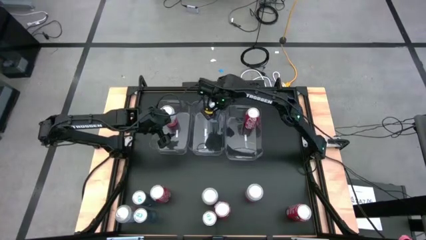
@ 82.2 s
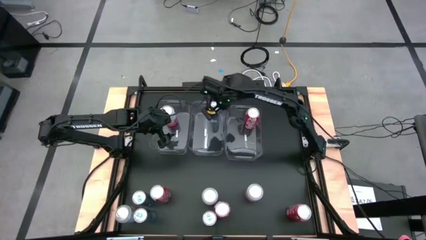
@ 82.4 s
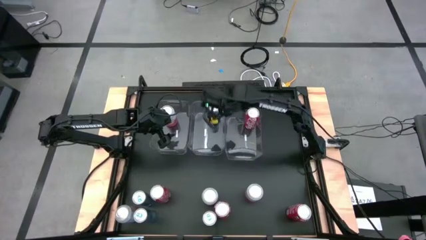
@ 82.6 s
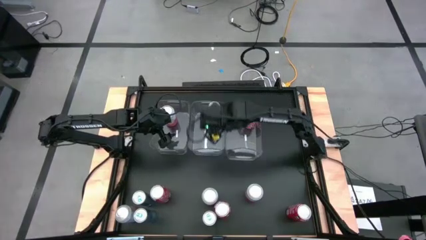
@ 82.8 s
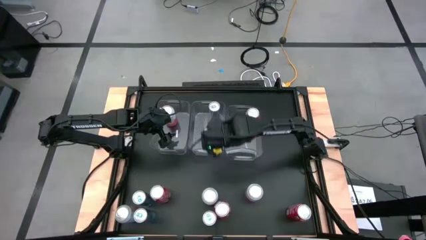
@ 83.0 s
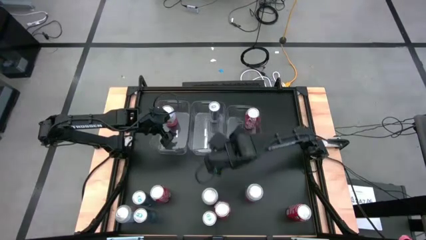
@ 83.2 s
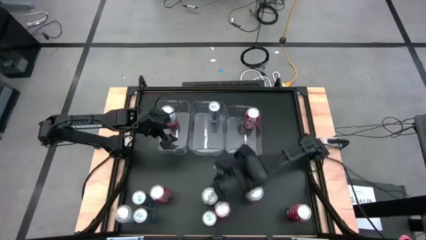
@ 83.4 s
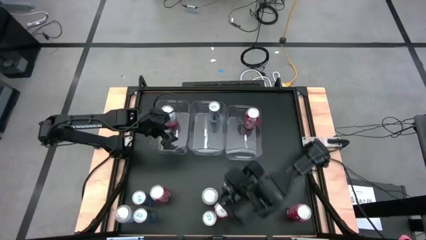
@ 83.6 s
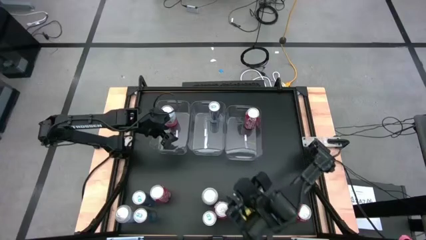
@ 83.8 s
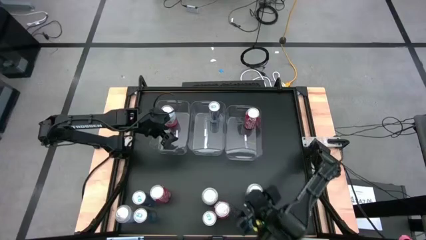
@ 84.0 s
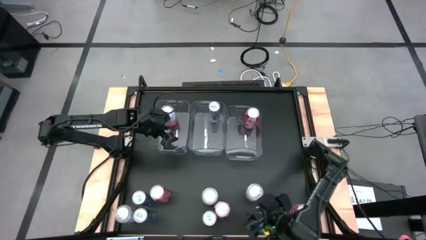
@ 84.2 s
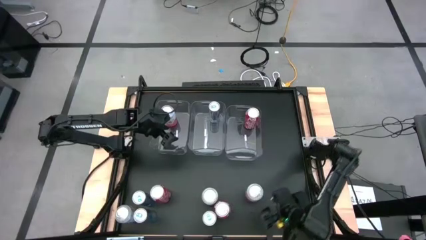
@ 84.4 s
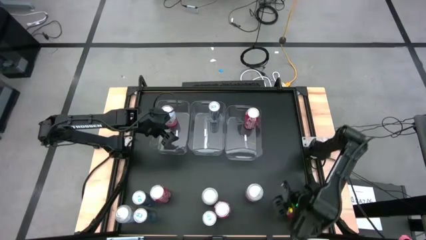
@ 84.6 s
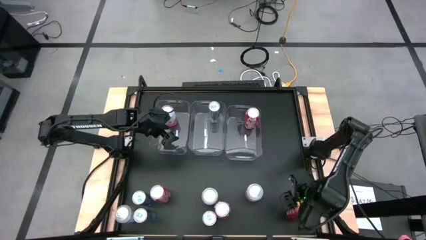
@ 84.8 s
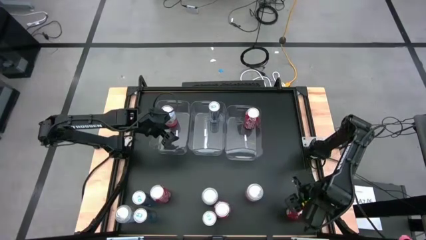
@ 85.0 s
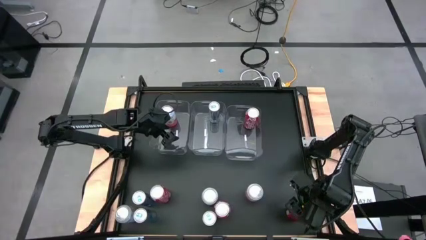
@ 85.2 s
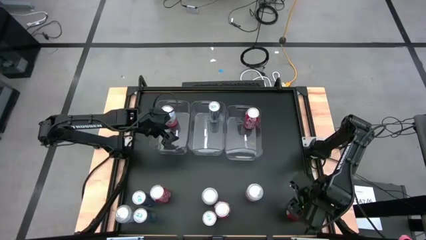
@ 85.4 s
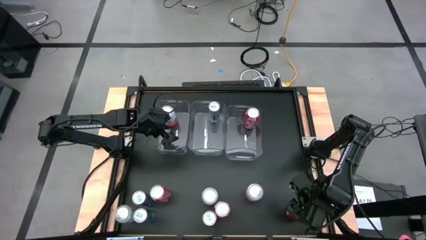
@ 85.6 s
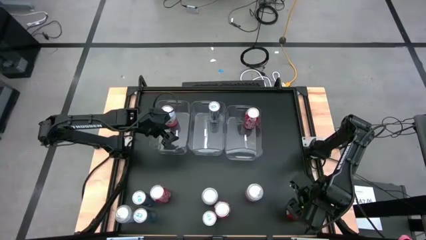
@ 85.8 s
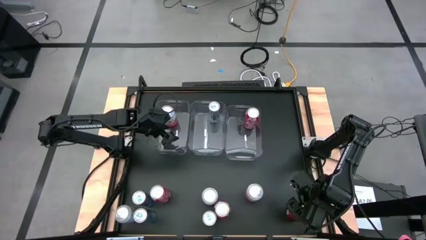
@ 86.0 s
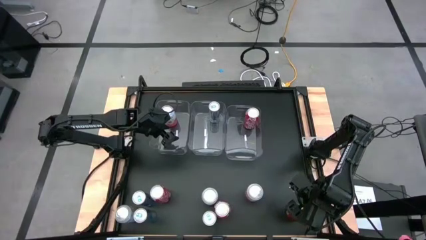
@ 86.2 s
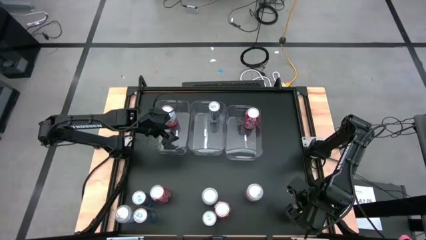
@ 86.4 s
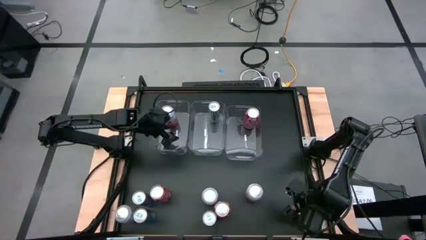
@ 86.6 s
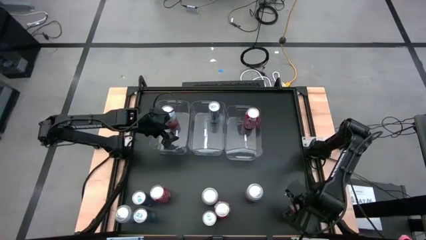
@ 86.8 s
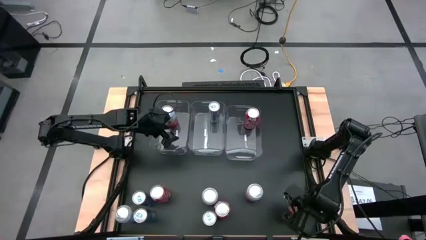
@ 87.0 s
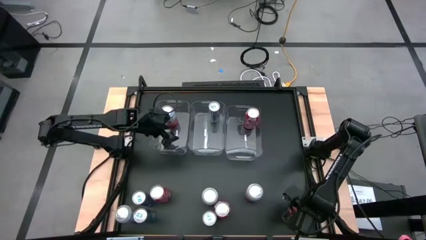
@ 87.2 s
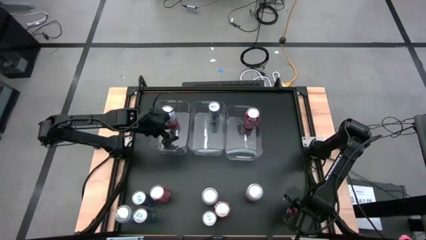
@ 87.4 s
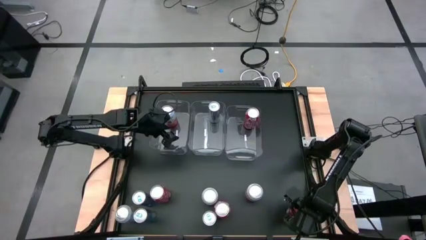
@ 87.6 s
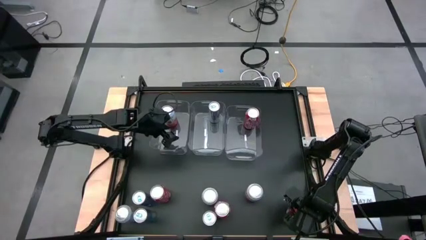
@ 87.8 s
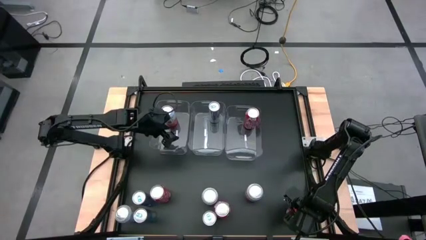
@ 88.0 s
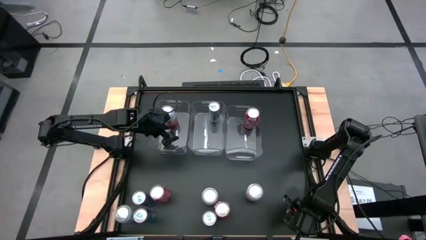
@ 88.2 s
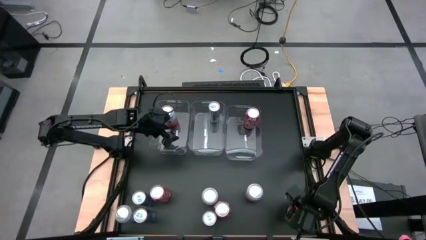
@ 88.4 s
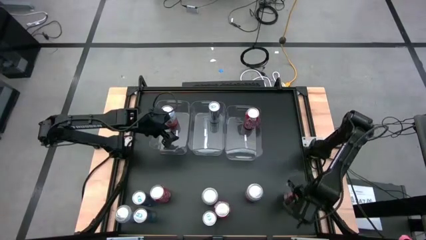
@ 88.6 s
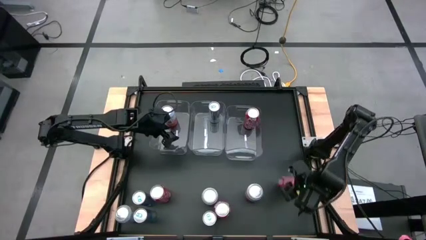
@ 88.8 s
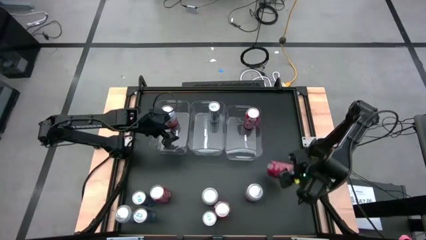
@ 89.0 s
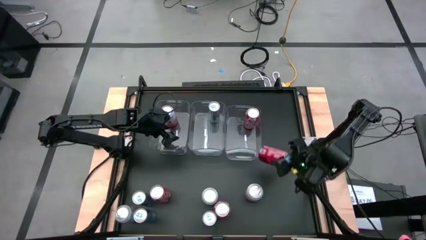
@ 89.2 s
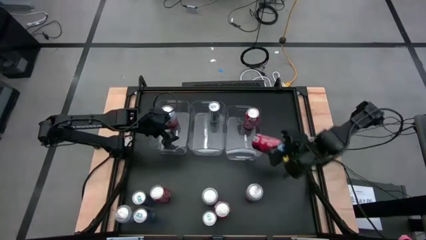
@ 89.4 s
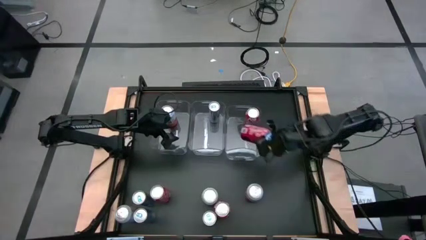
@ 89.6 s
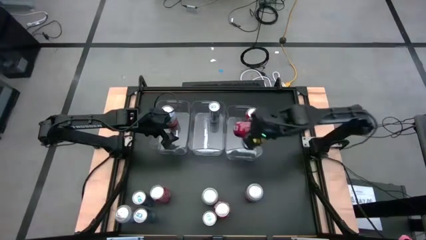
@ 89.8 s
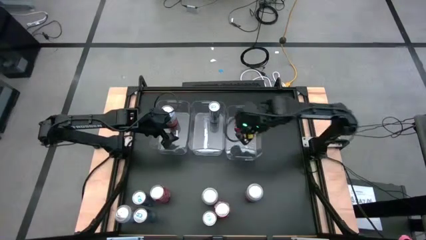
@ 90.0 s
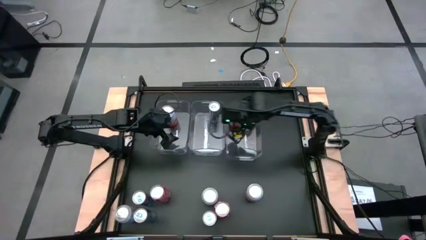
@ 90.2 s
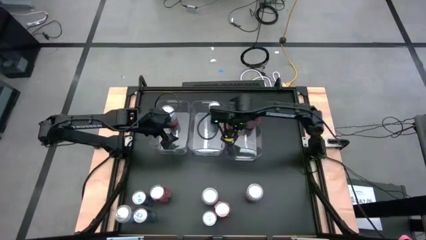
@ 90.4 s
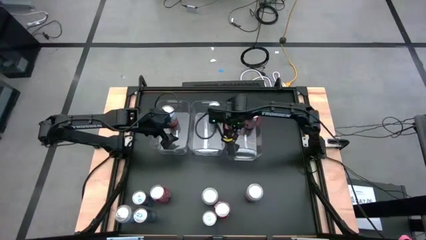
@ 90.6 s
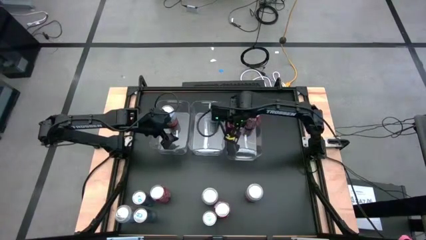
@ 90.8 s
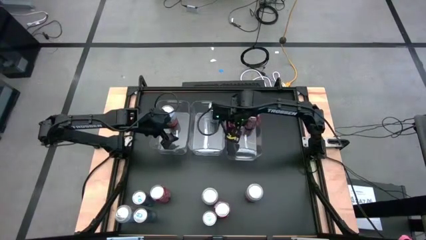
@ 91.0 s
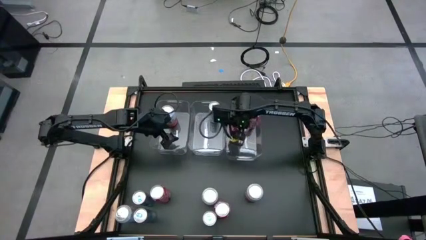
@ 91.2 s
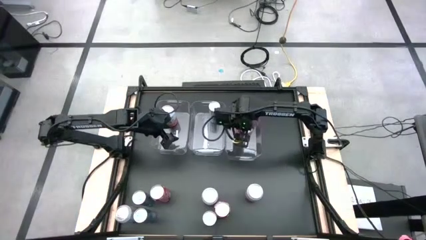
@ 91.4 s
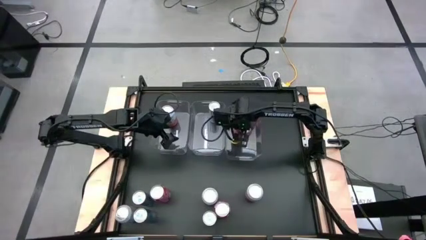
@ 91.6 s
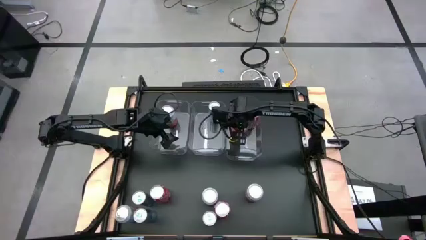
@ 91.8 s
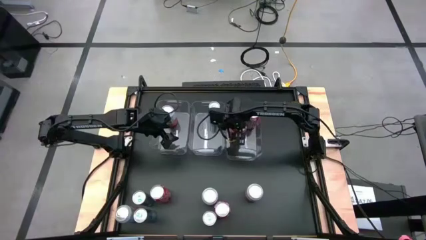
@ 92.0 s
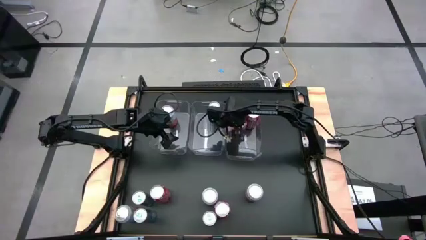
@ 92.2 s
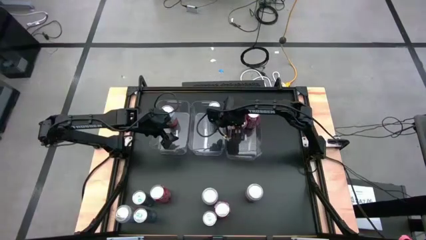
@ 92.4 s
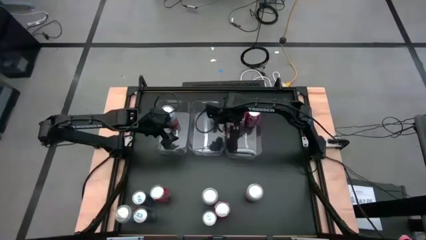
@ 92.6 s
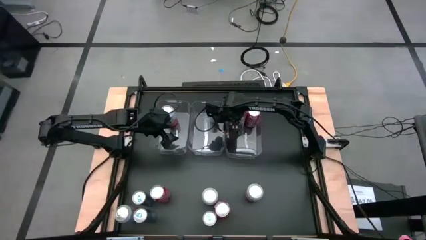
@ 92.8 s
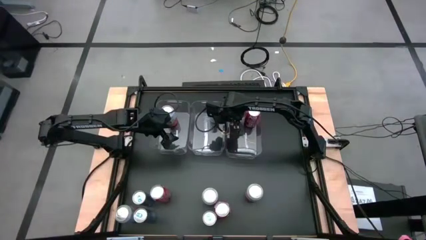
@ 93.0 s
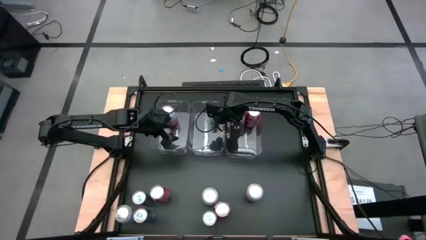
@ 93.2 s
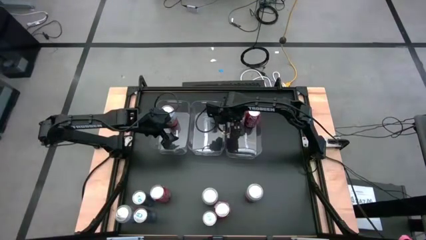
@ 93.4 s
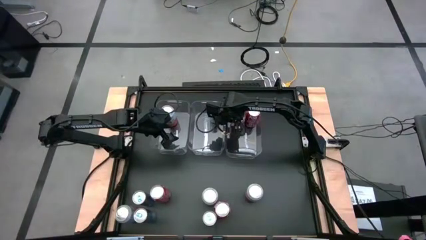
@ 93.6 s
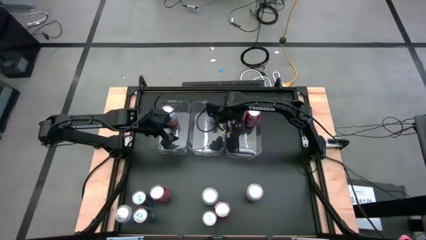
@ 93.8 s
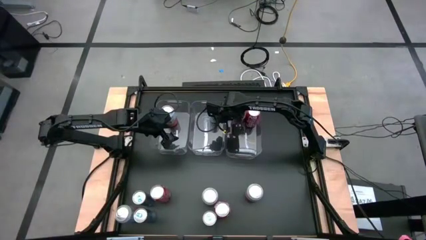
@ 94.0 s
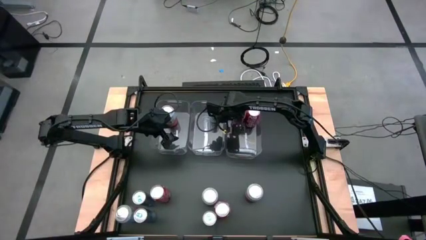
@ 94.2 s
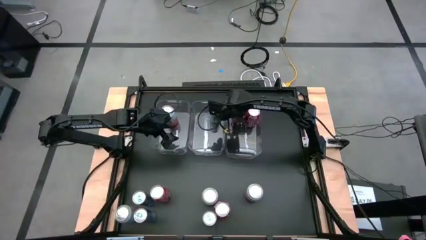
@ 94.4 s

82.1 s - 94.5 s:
Task: Sort soda cans
Put the red soda can into the right transparent bin
